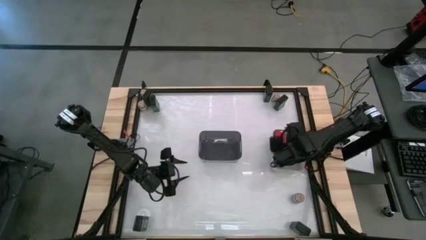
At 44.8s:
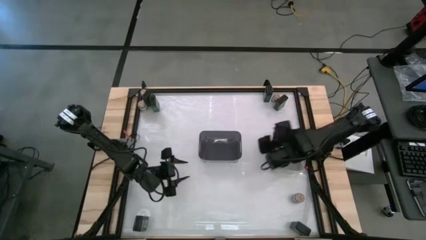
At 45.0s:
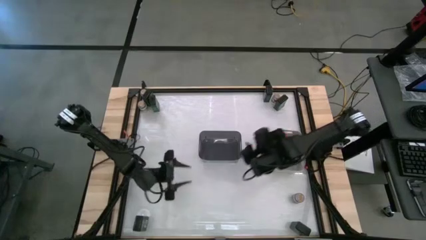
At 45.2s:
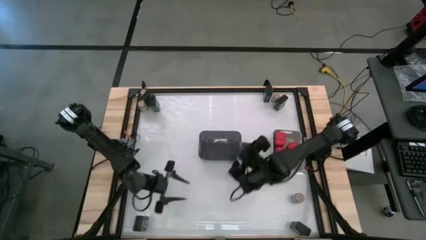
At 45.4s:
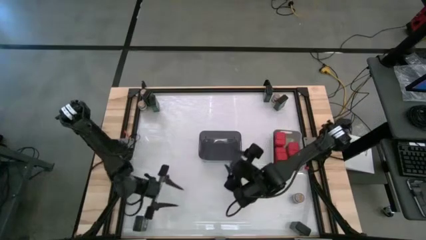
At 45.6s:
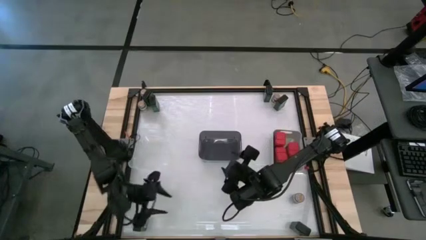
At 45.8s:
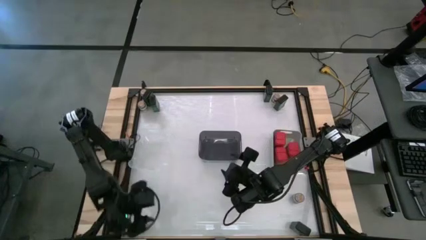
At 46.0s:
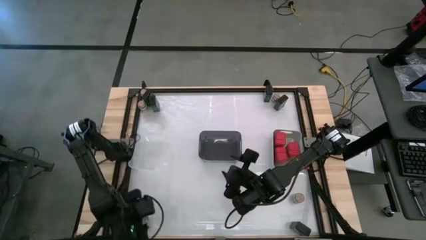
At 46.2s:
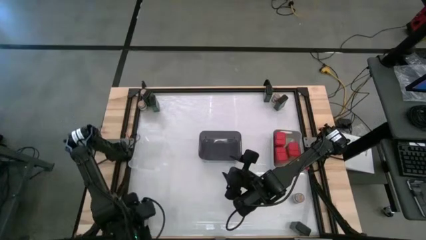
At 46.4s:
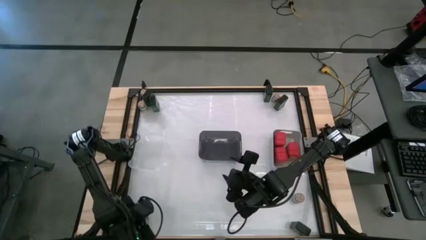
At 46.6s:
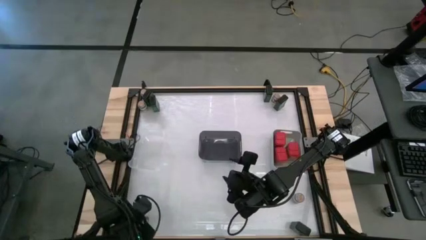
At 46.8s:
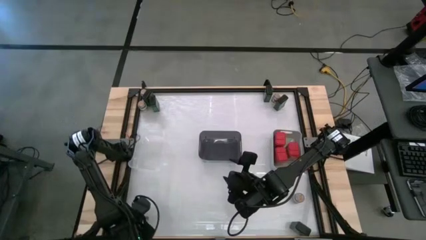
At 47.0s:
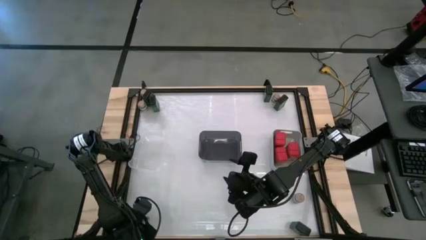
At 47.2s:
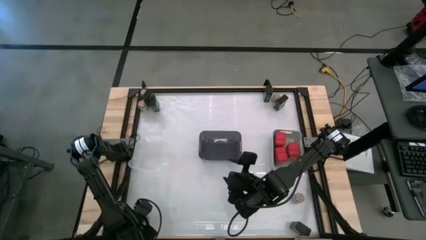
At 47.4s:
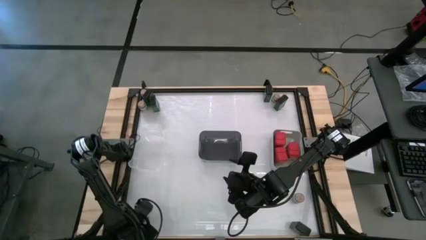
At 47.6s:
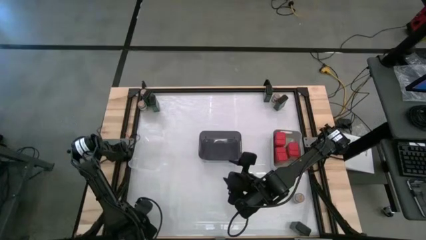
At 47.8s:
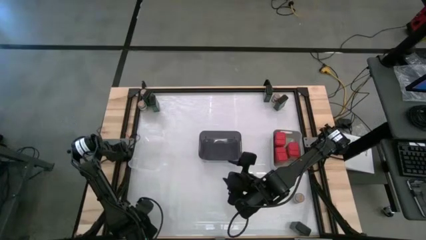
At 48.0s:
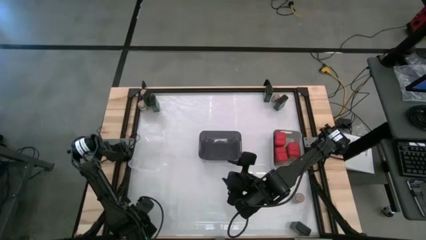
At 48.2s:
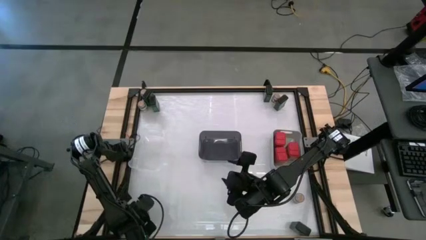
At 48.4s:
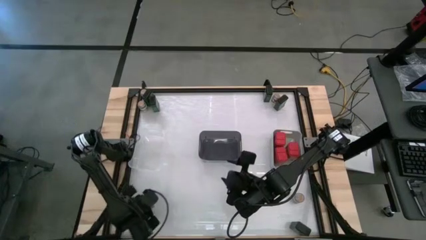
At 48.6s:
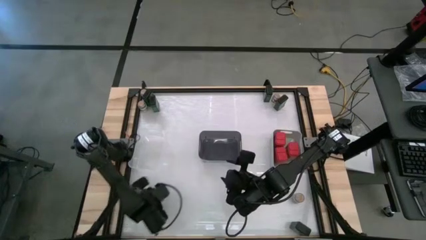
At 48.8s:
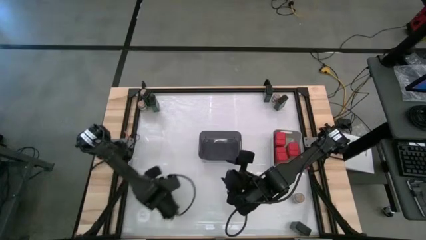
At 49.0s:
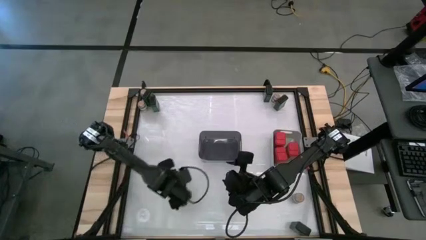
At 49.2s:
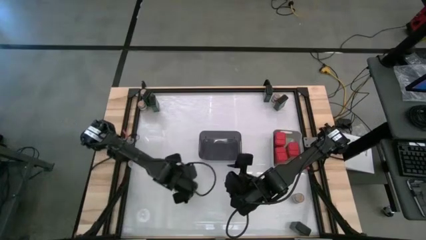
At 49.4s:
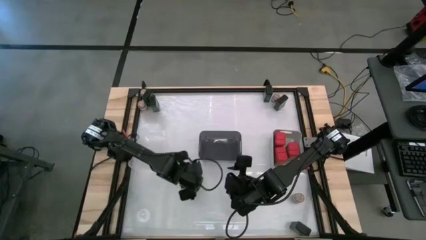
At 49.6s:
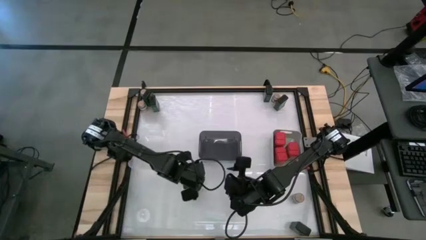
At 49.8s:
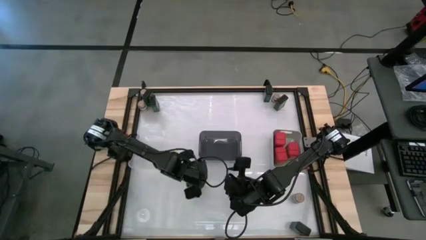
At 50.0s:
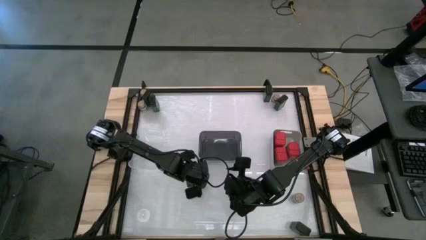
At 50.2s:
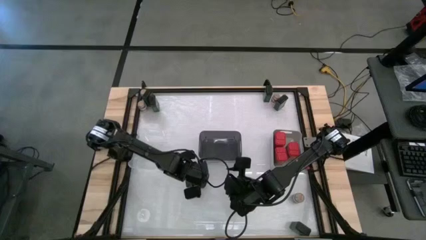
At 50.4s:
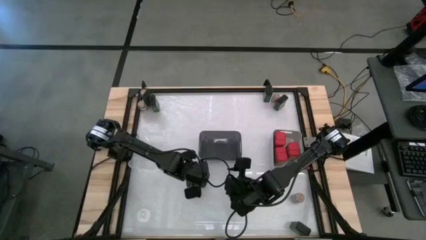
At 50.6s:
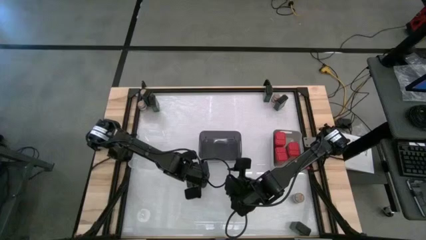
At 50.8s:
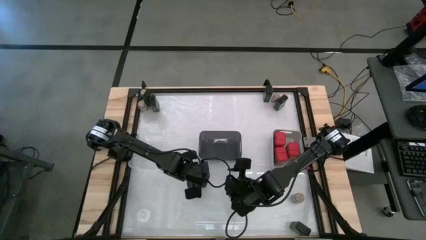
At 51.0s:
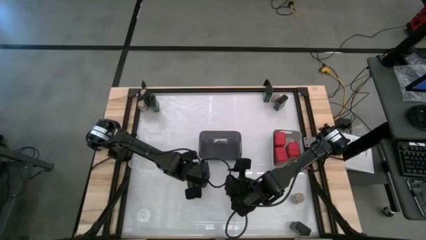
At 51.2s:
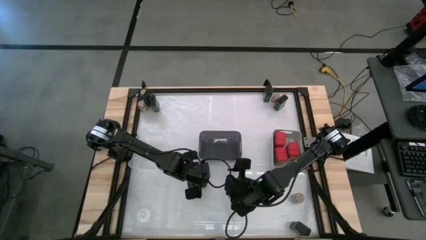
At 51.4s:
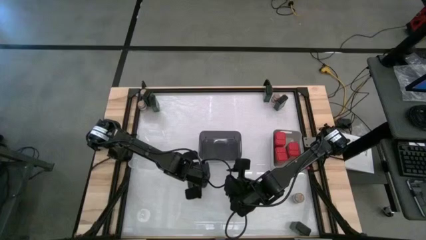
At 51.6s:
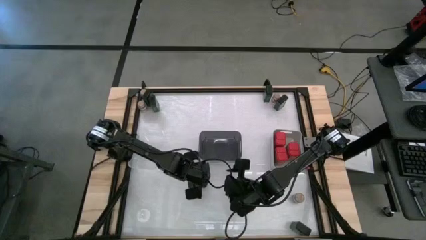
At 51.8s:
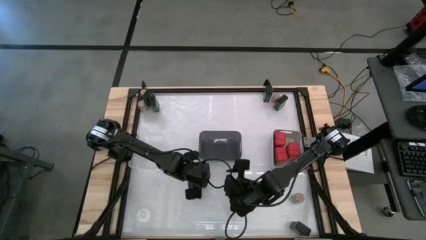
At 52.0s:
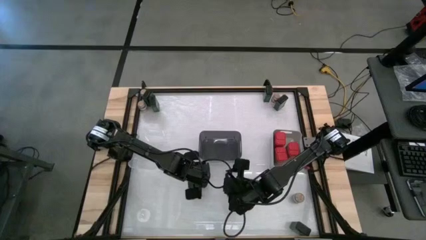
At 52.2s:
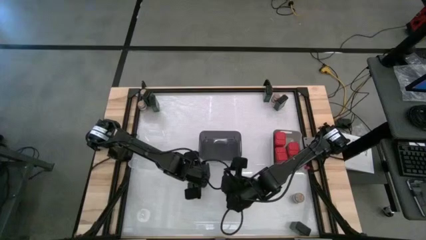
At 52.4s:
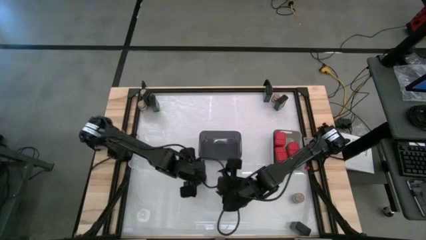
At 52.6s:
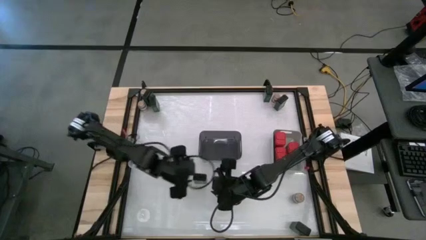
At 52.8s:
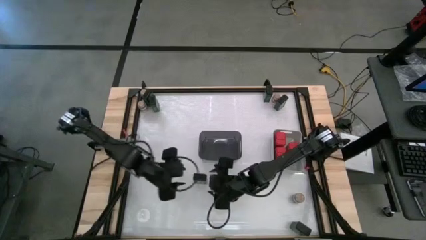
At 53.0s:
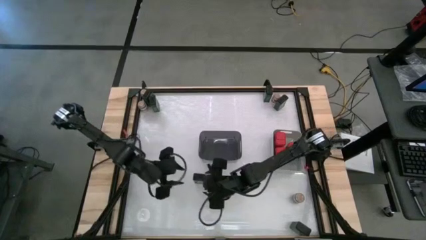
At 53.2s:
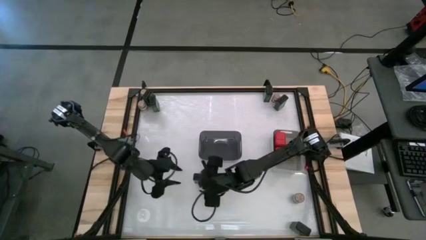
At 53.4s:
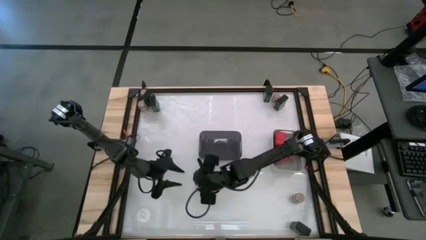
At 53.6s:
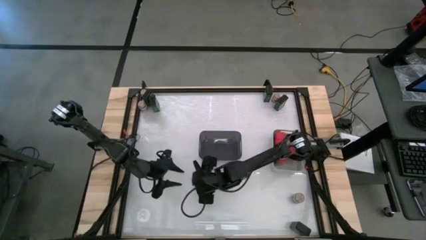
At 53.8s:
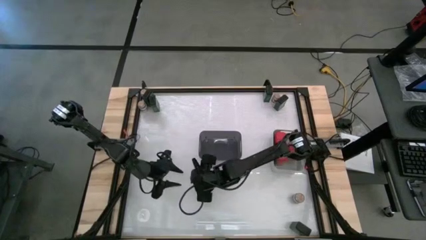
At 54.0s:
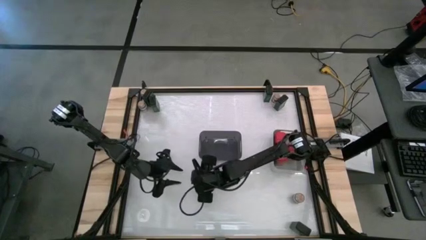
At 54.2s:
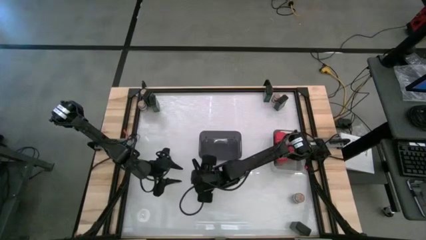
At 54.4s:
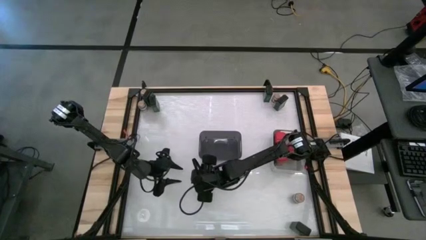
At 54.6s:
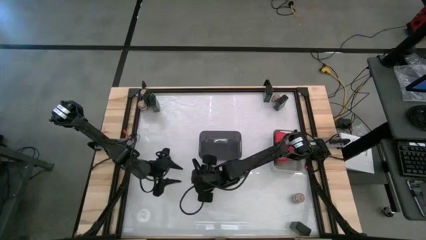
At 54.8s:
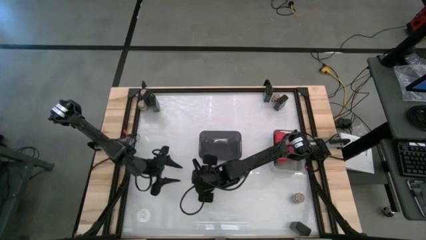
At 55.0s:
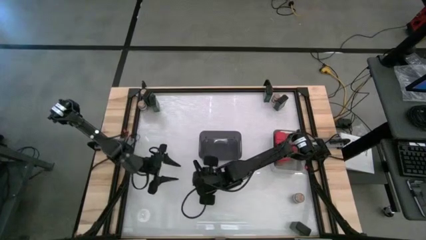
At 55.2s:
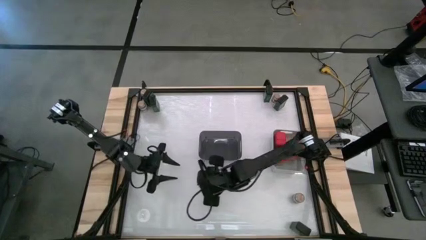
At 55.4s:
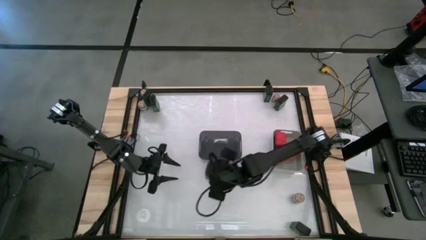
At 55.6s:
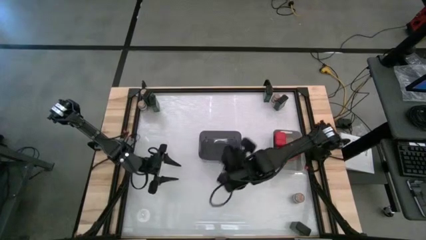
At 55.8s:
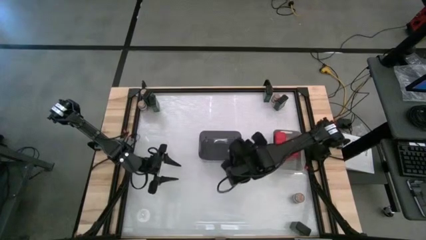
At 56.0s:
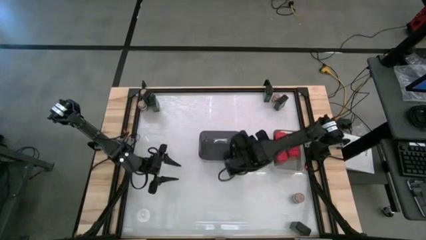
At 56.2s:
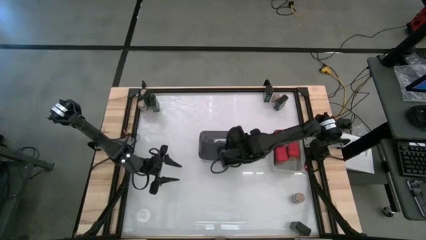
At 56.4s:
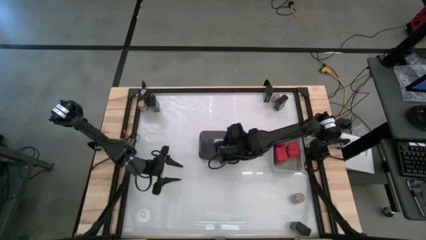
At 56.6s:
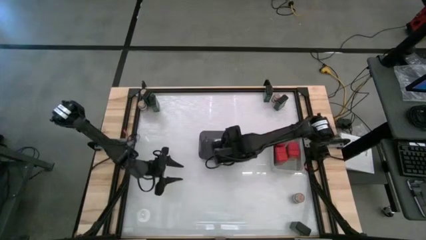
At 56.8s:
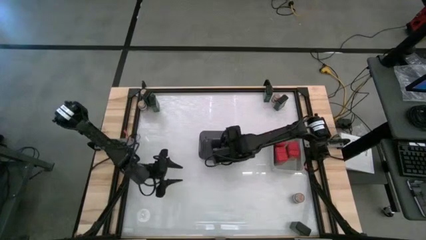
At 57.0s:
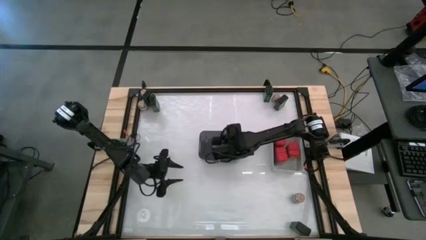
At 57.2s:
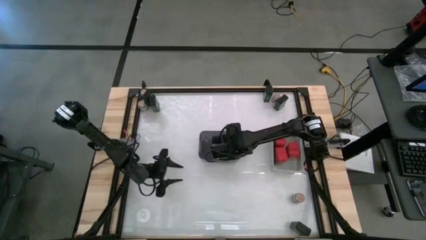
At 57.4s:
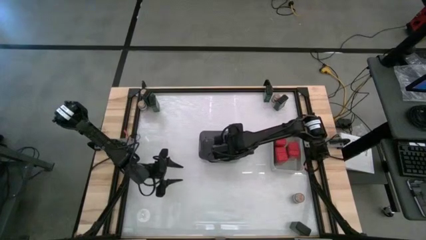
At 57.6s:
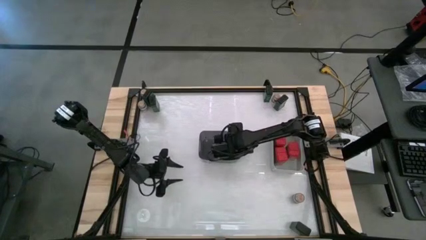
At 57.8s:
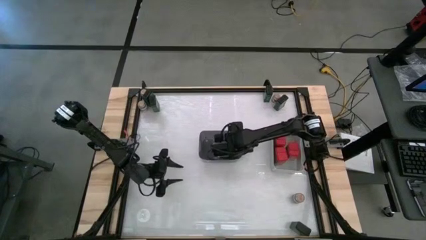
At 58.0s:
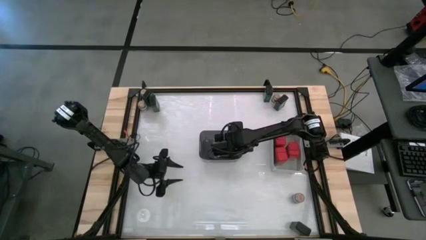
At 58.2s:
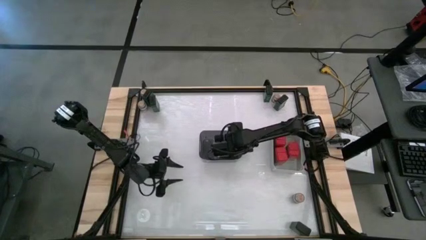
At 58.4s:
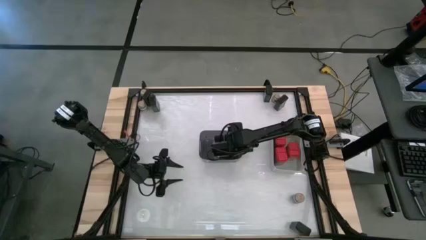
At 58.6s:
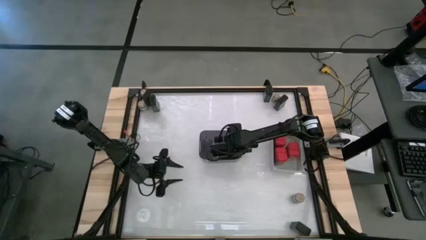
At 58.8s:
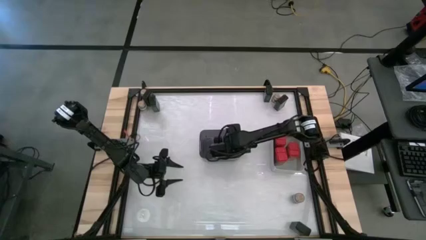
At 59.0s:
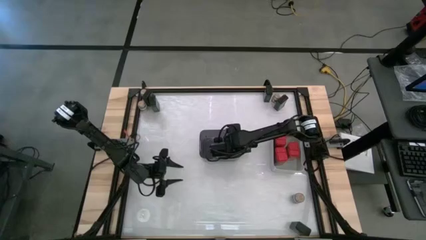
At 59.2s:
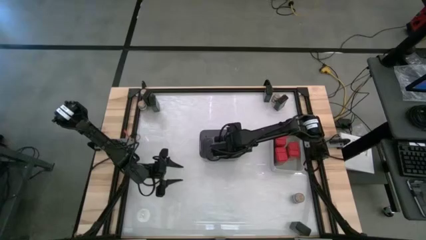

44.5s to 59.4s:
Task: Sort spices by type
Put the green spice can into the gray bin
